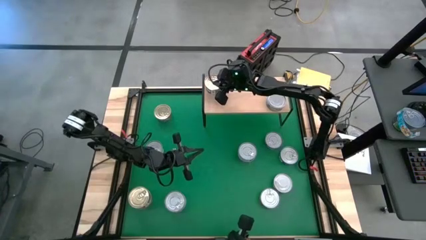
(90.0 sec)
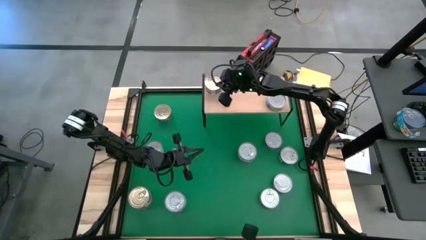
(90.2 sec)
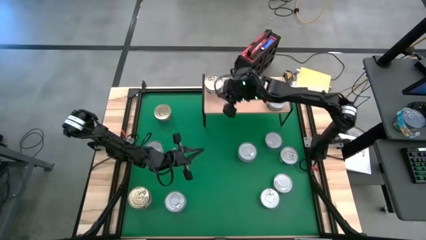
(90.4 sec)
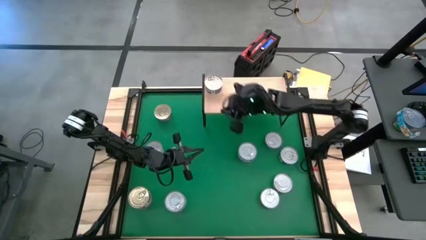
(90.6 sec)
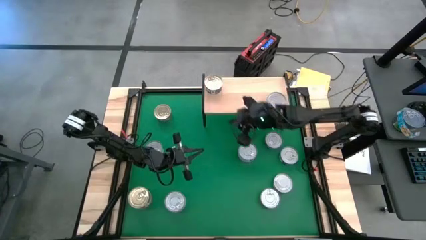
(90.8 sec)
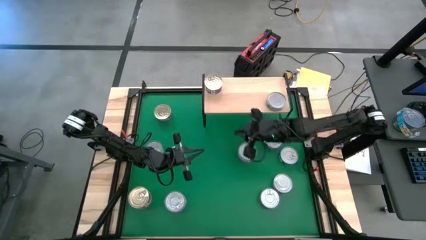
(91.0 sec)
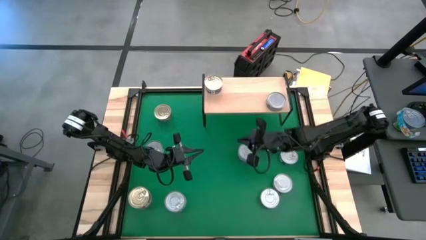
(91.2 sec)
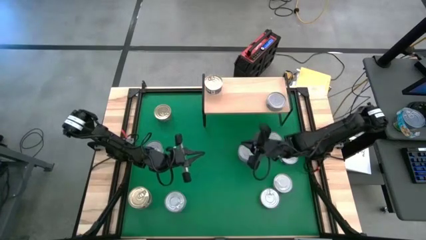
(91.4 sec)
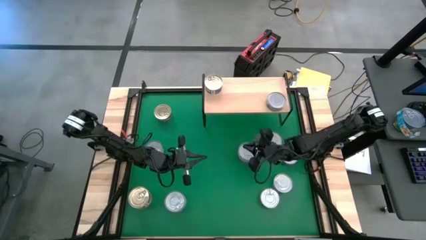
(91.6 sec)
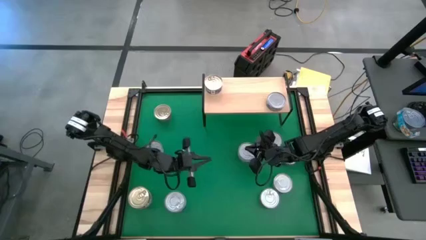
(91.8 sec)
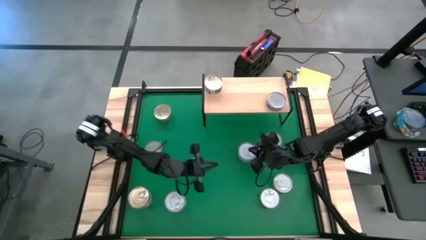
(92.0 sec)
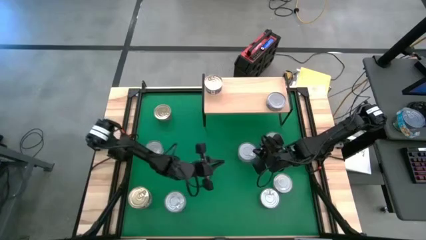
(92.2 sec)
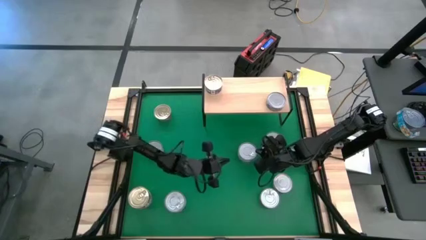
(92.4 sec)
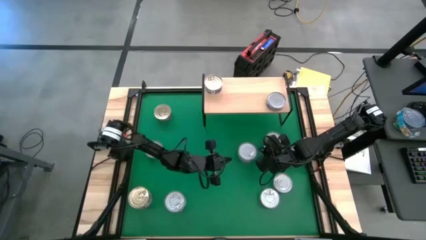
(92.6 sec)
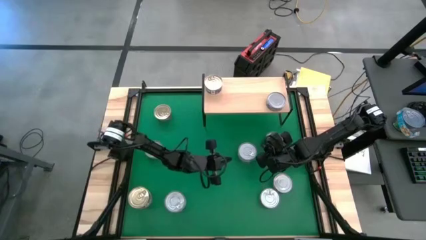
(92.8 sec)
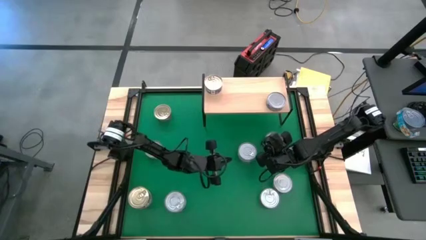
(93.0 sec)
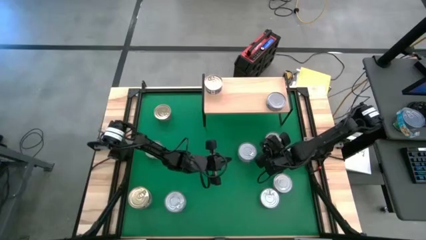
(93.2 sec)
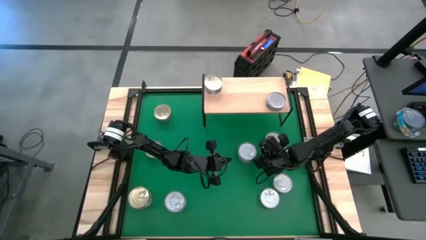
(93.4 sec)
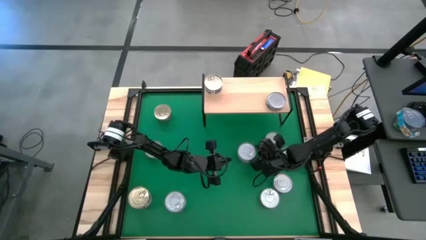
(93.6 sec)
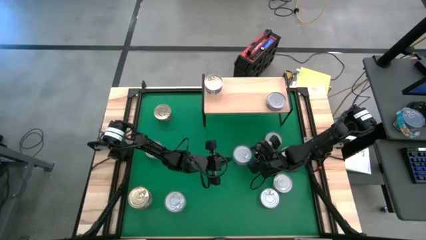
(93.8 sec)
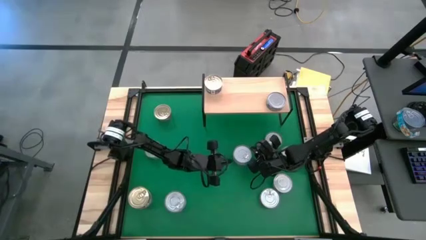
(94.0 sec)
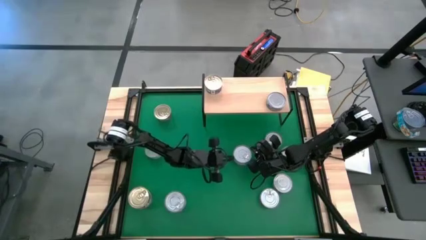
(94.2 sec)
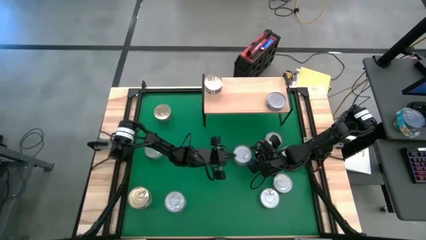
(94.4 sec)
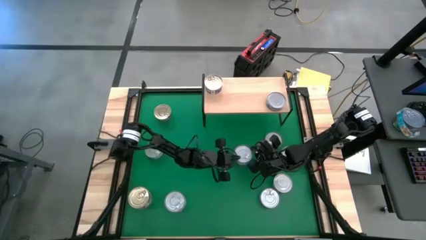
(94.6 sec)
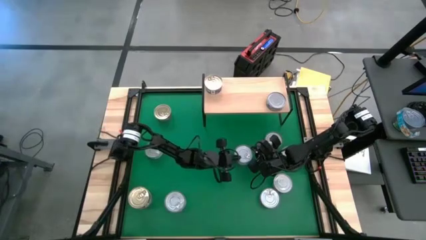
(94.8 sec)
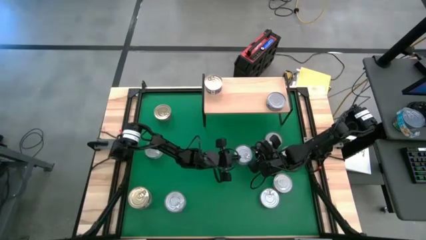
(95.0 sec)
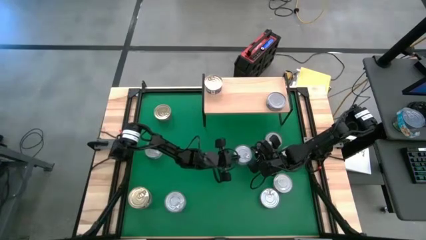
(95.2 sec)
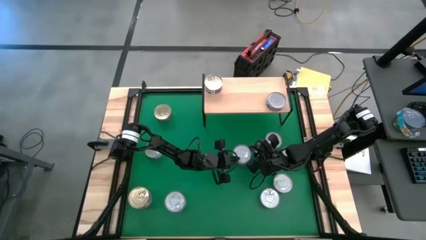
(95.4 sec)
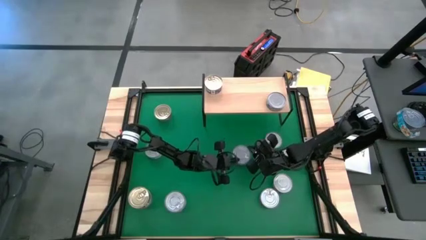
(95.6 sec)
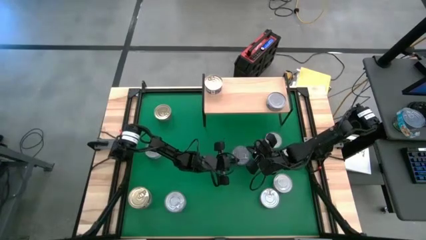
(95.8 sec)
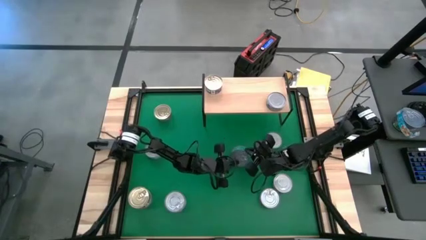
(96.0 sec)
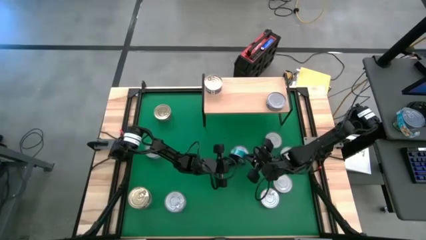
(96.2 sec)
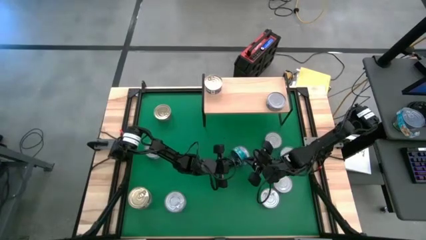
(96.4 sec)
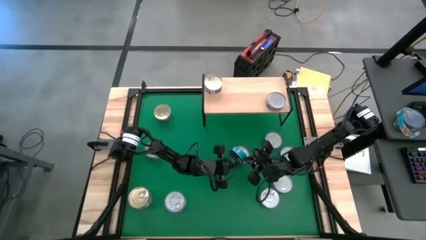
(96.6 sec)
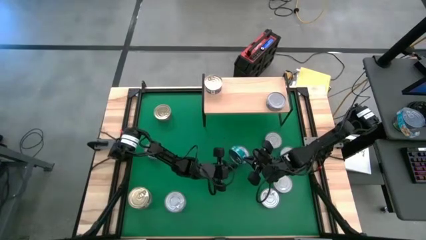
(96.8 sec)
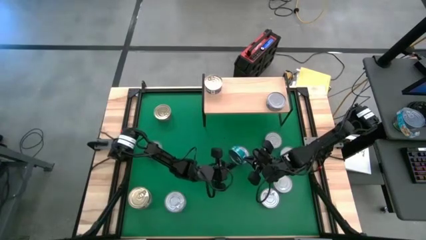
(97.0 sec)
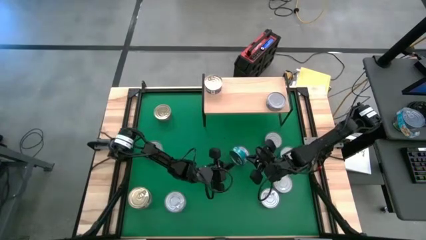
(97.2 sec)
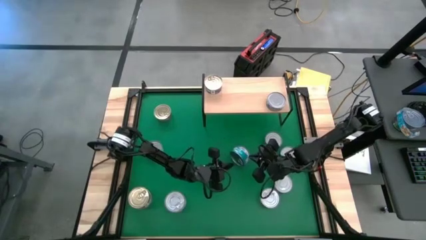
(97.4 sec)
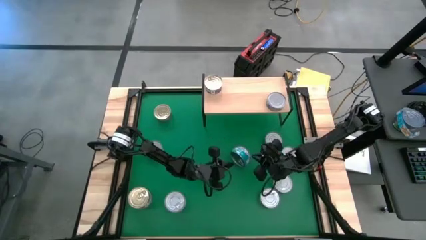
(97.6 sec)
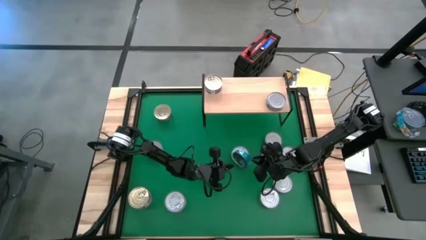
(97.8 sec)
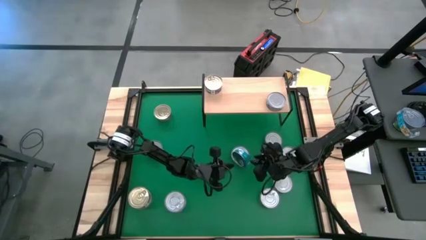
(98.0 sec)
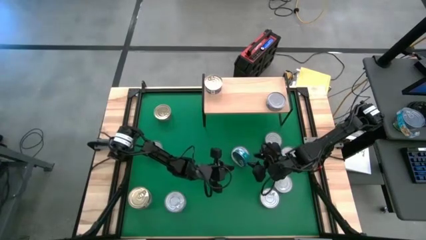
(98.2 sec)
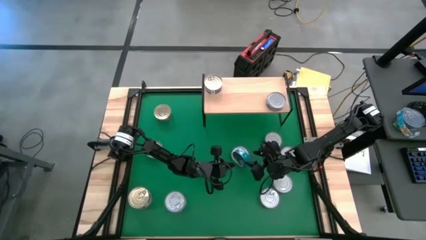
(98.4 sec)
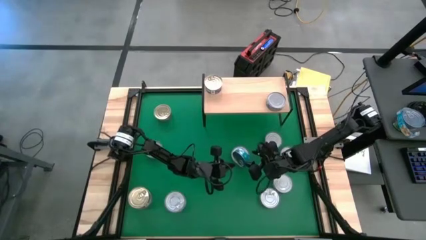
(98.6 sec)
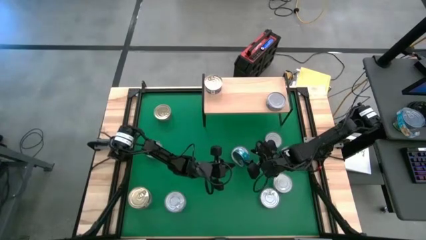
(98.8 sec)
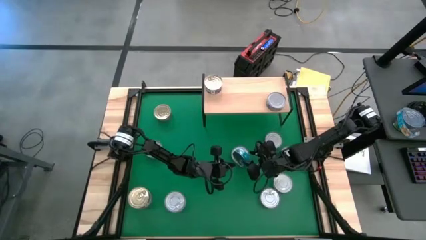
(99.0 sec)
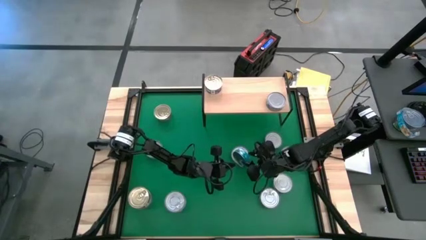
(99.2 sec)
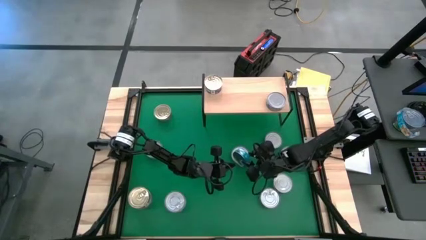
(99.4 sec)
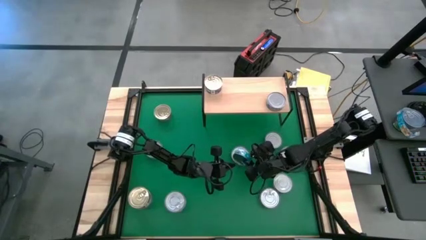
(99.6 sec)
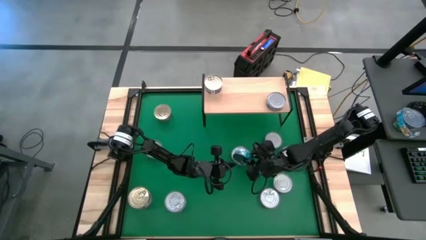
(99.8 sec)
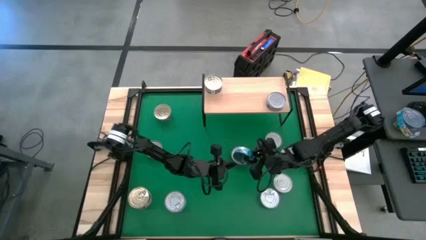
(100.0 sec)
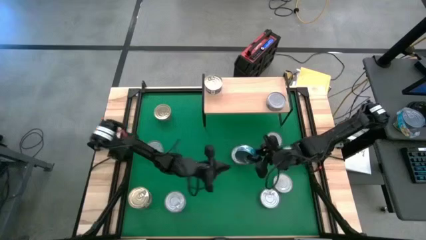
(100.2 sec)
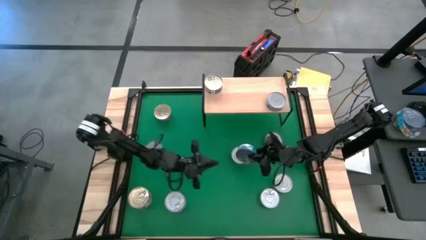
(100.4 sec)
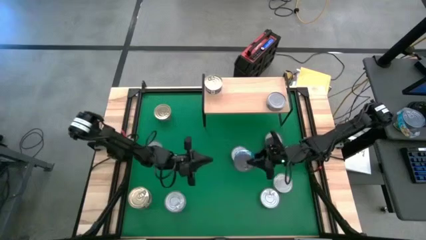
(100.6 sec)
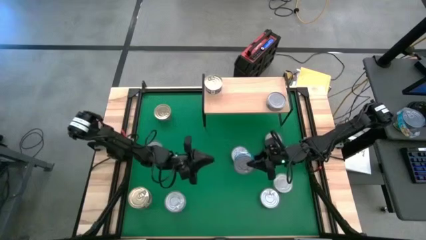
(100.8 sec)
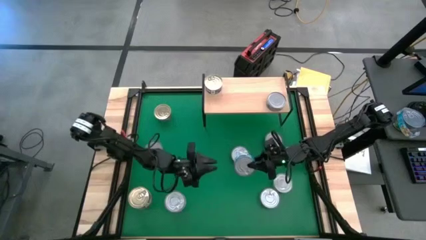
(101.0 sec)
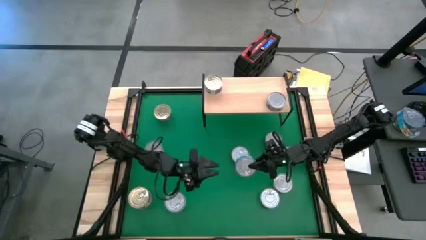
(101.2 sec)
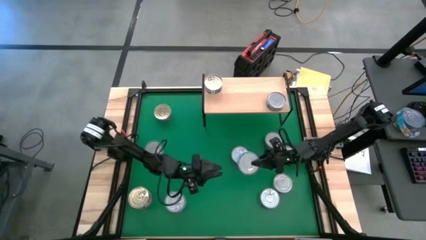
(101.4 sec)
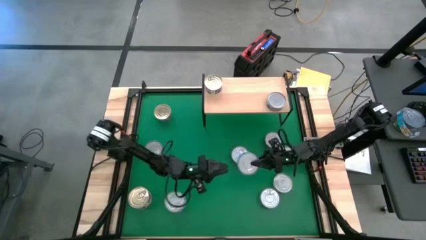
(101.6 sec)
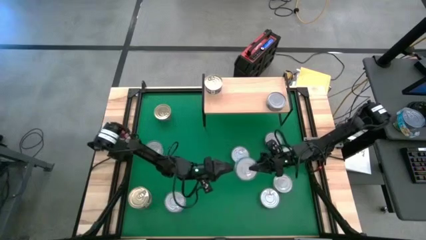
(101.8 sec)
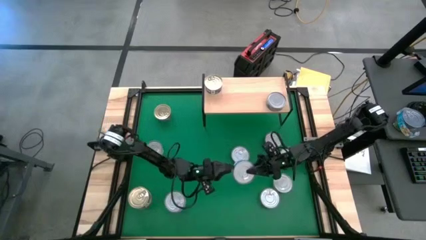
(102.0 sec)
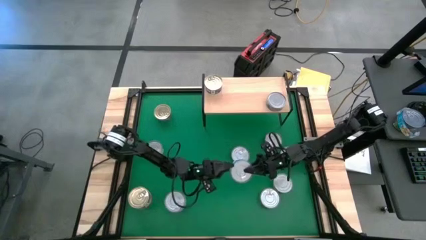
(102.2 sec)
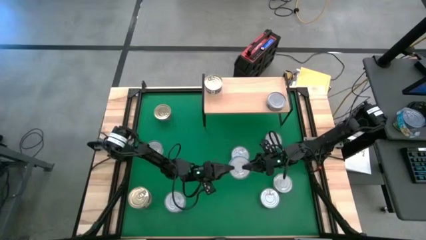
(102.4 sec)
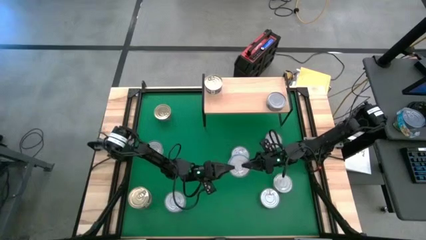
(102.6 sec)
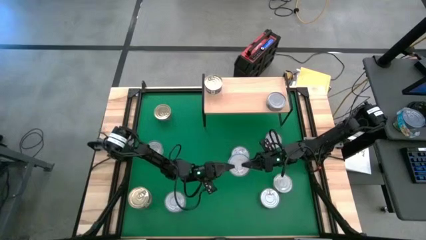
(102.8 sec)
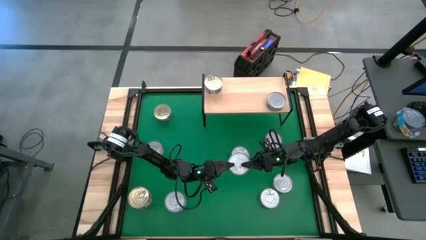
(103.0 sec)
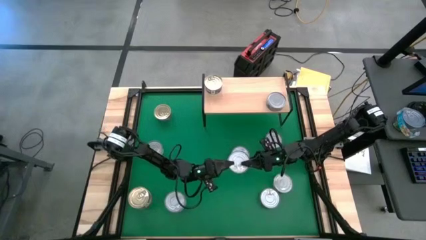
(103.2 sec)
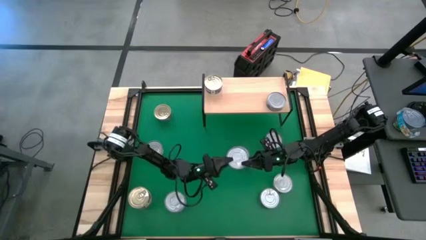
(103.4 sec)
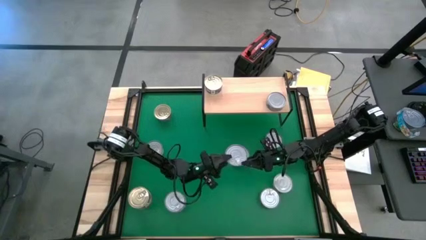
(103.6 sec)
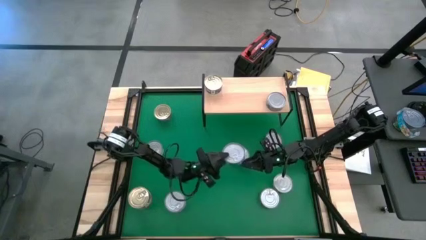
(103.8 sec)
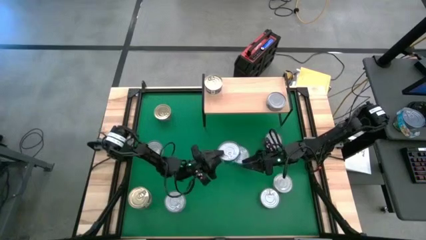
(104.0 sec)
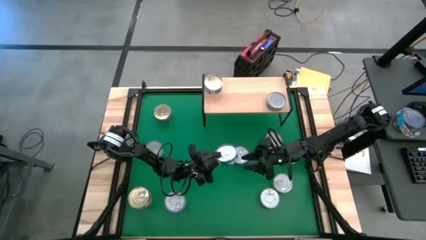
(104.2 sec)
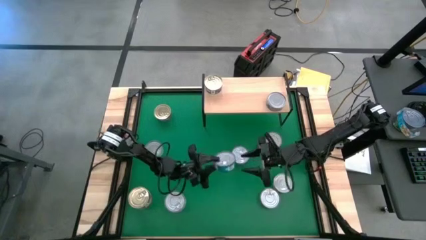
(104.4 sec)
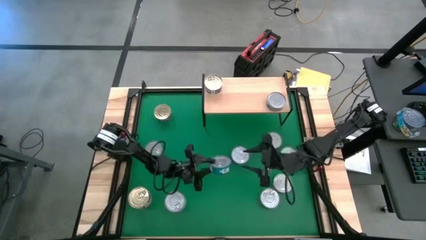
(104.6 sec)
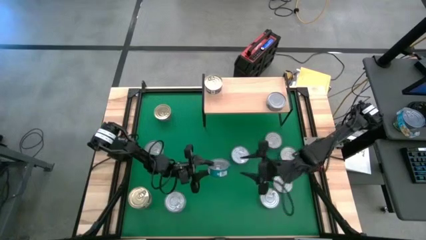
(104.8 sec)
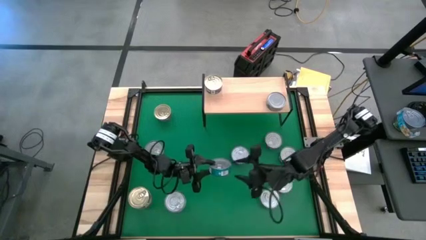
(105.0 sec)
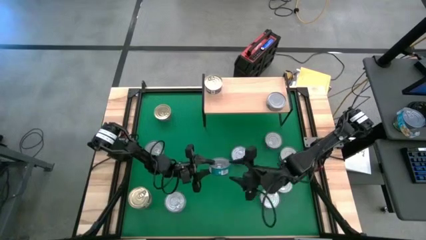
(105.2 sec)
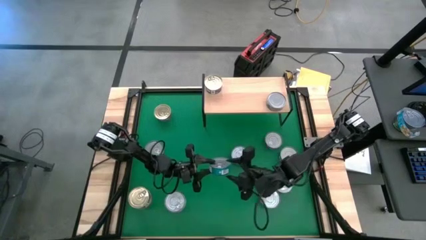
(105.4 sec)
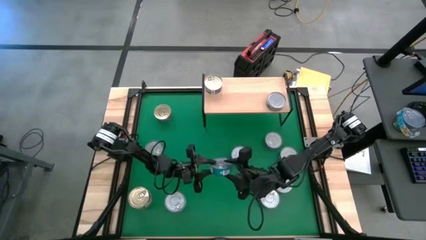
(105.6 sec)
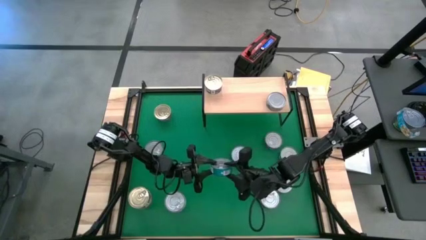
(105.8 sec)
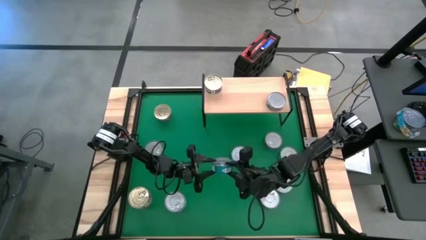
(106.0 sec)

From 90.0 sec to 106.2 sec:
Task: Stack canned seafood by type on shelf
Put the green/blue tuna can on the shelf
